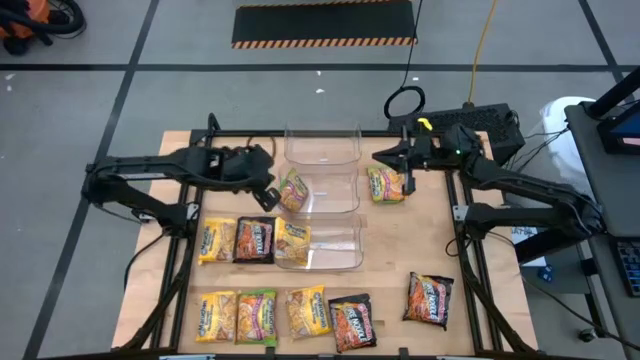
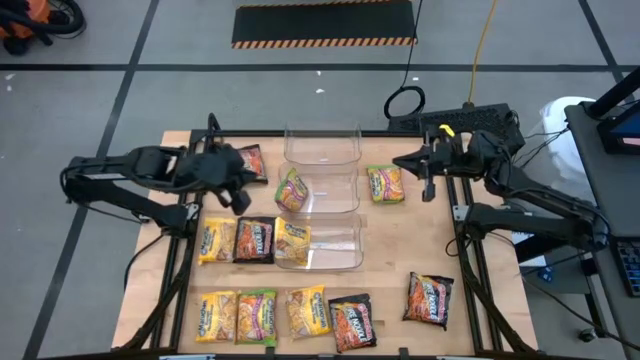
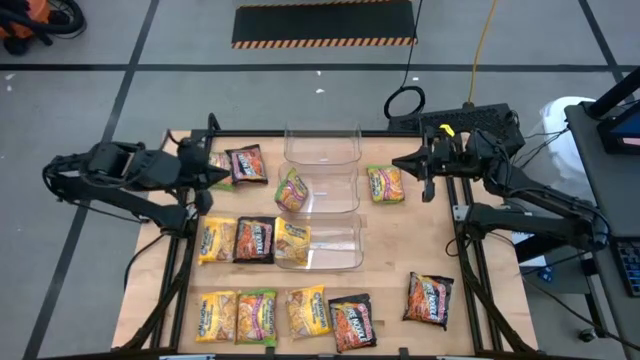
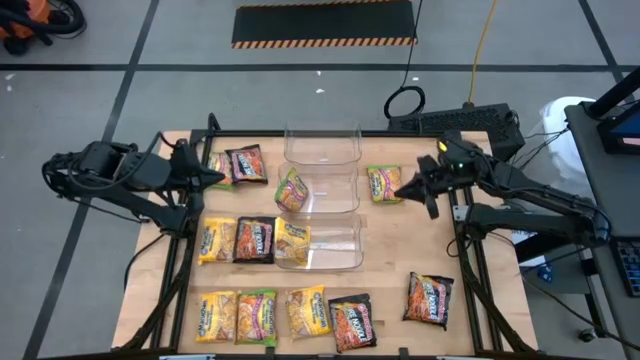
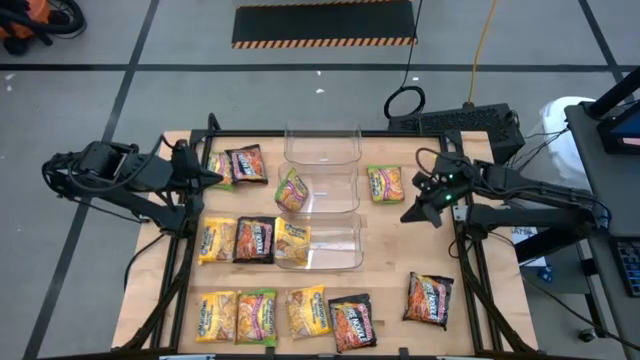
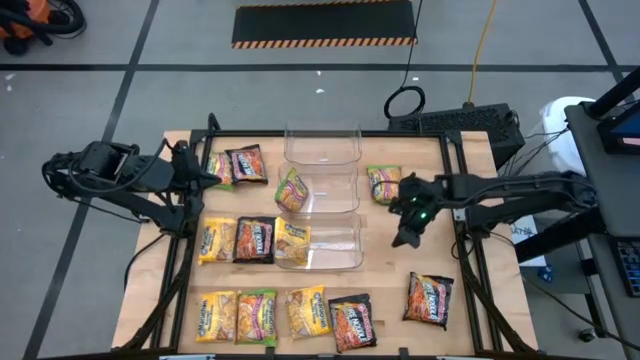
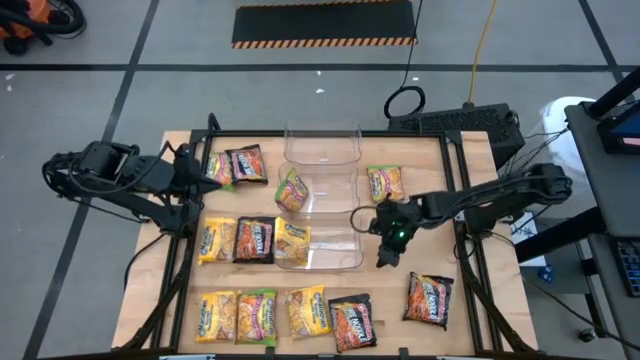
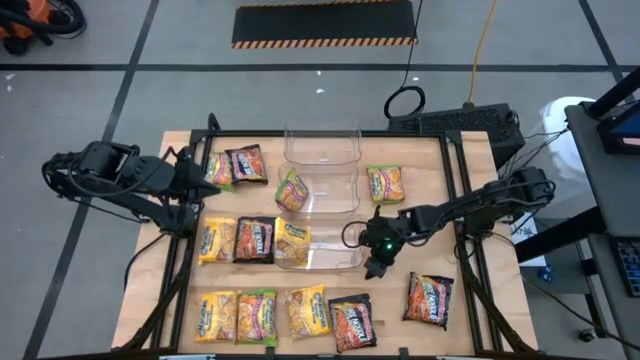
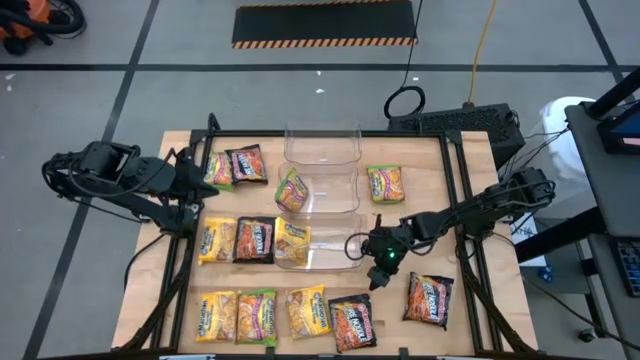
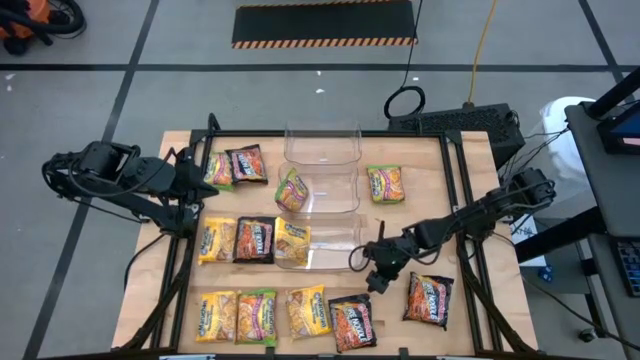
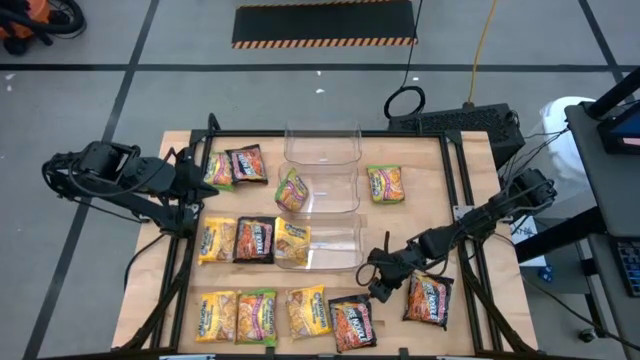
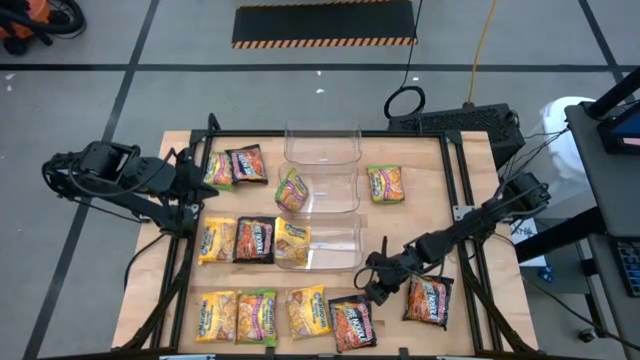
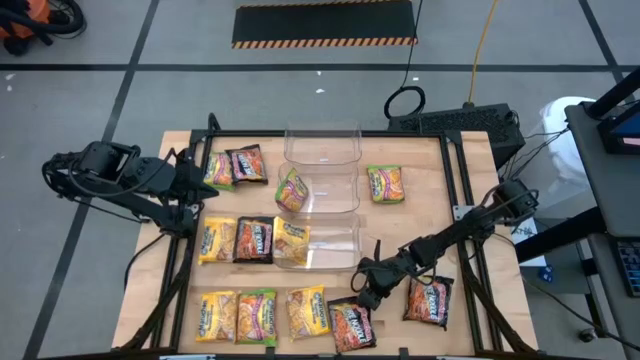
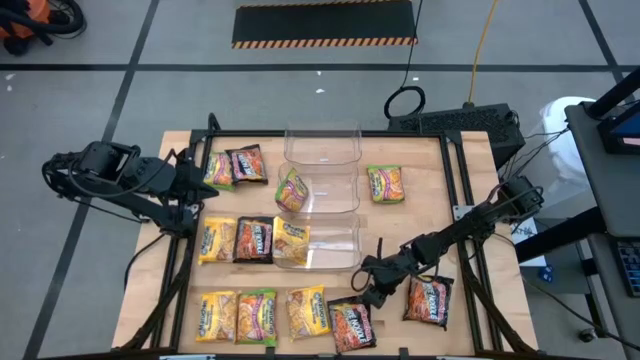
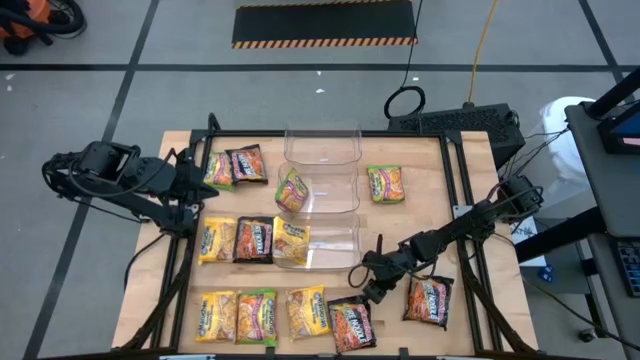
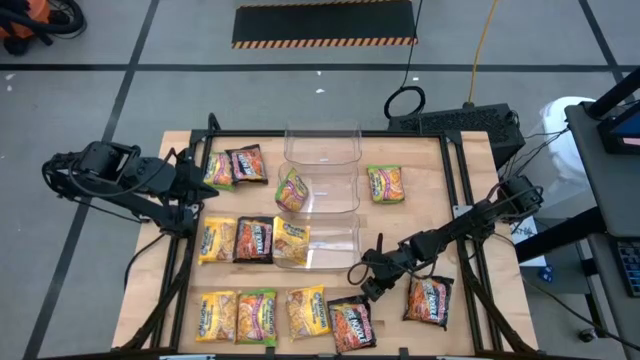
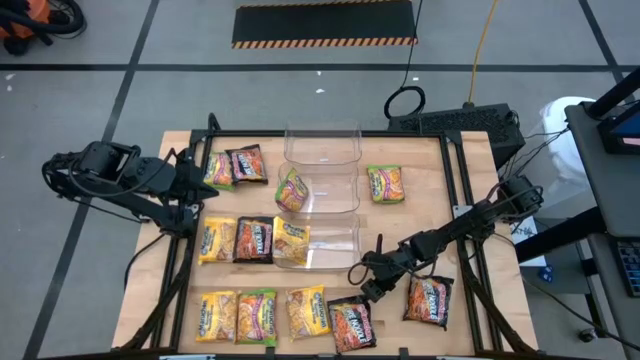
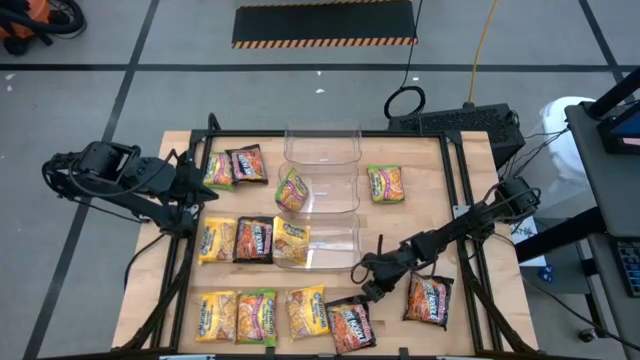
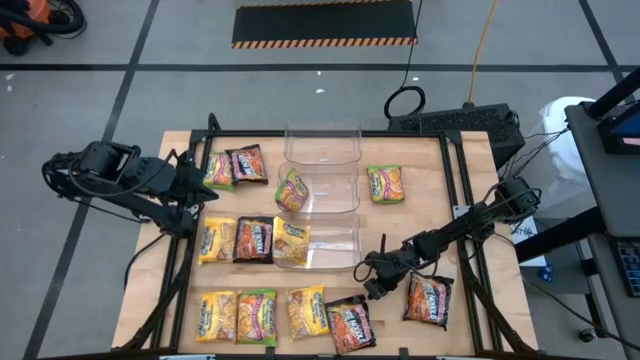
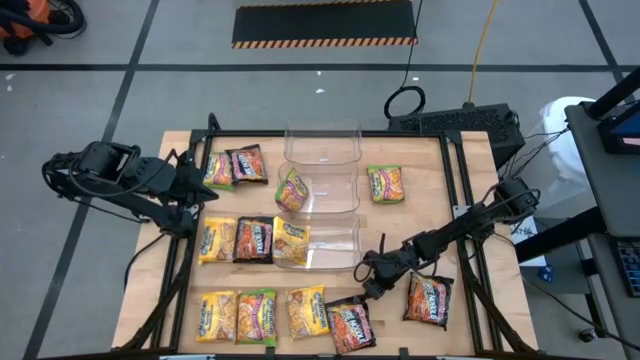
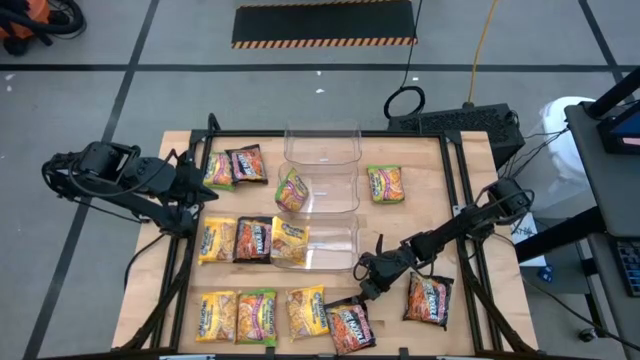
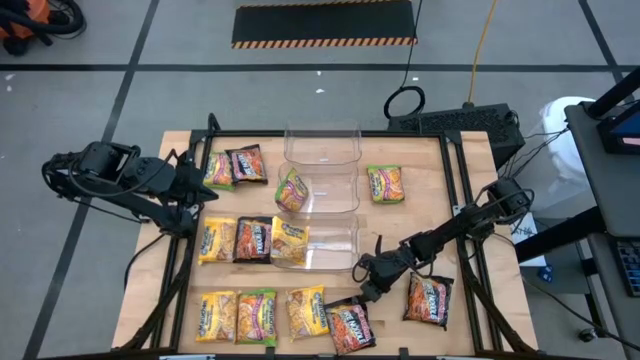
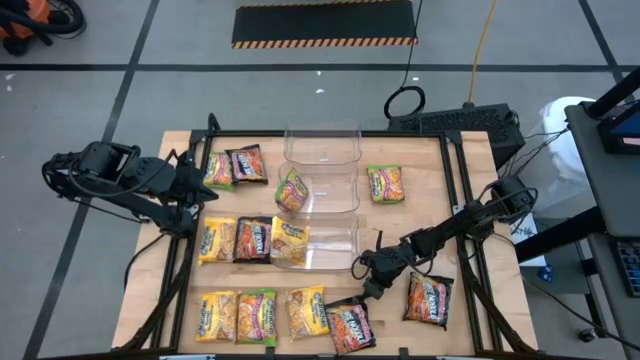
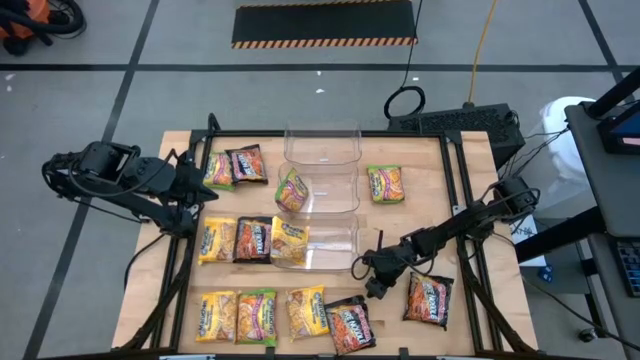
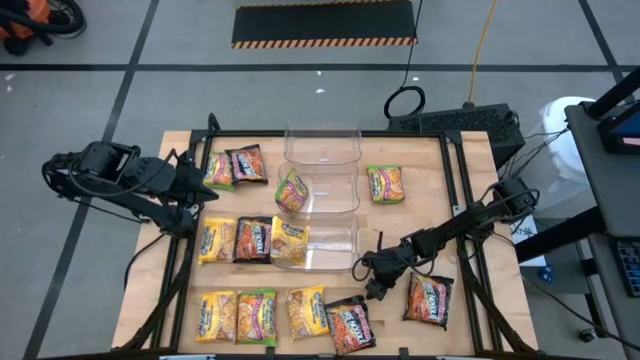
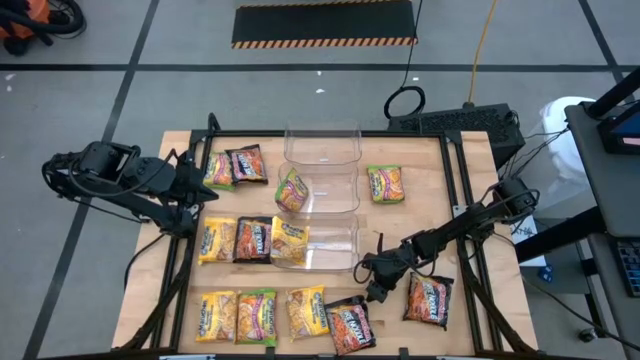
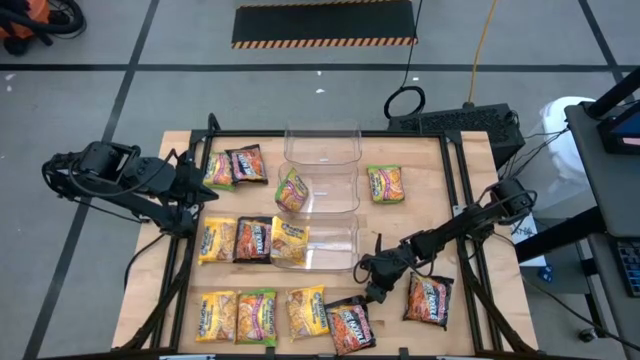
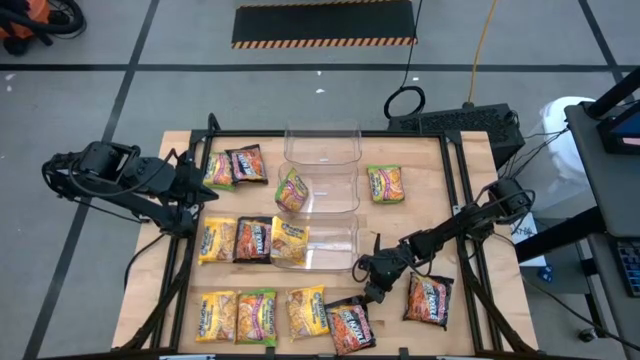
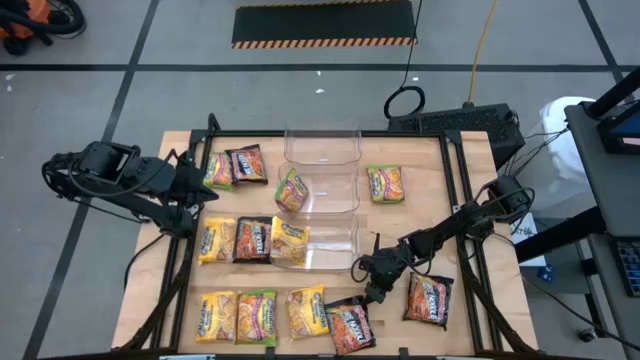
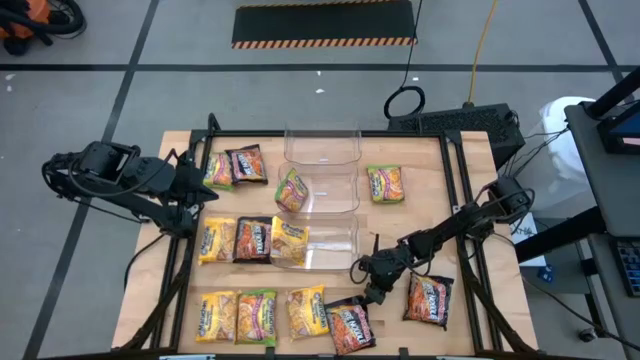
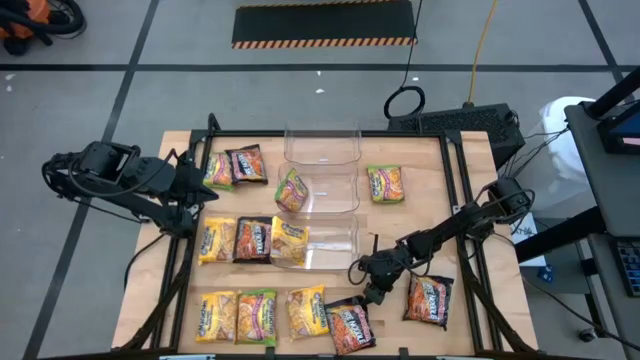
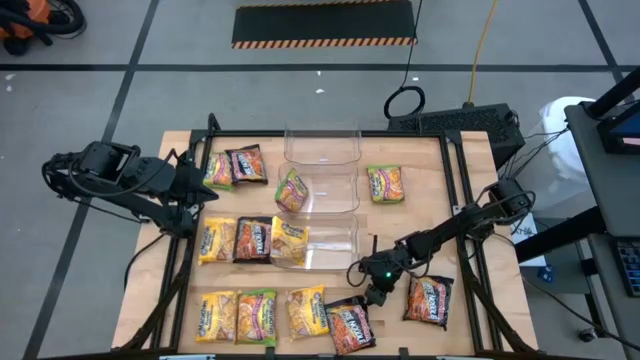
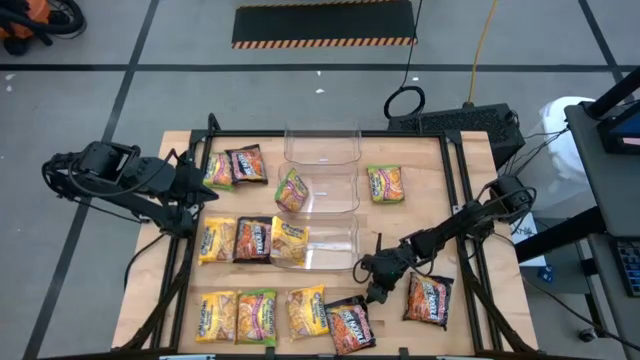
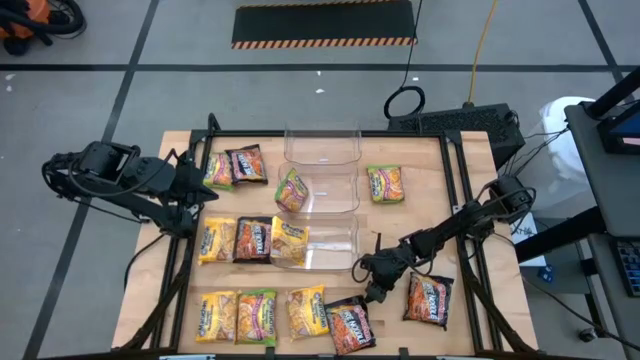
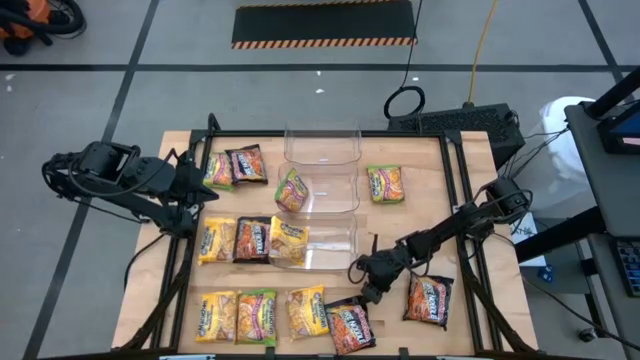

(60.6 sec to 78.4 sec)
Task: Sort Maruchan noodles
Put the black noodle pack into the top transparent bin

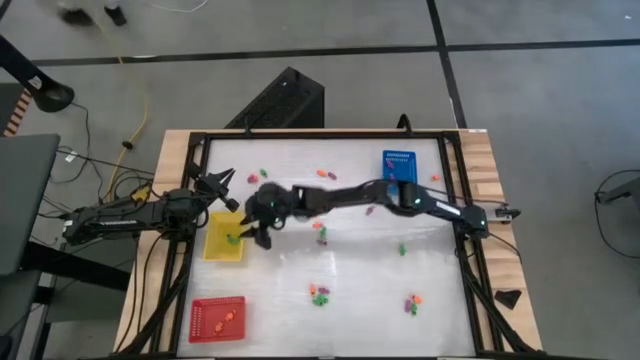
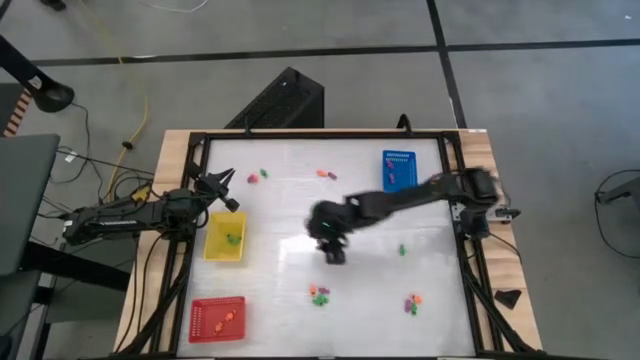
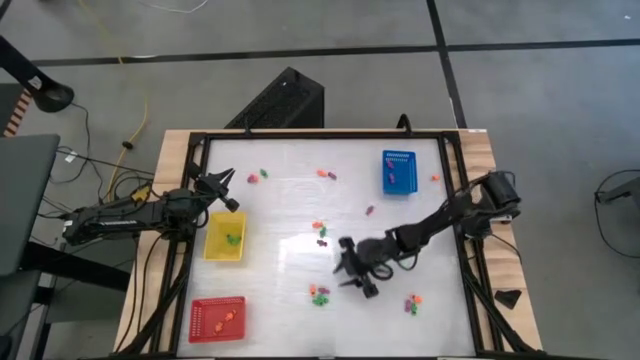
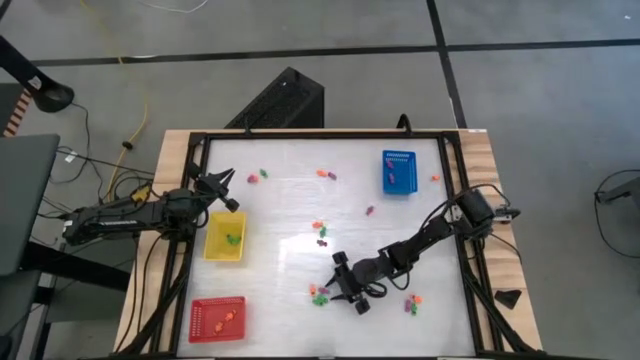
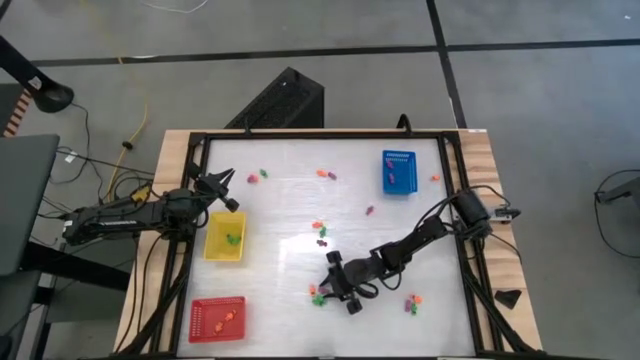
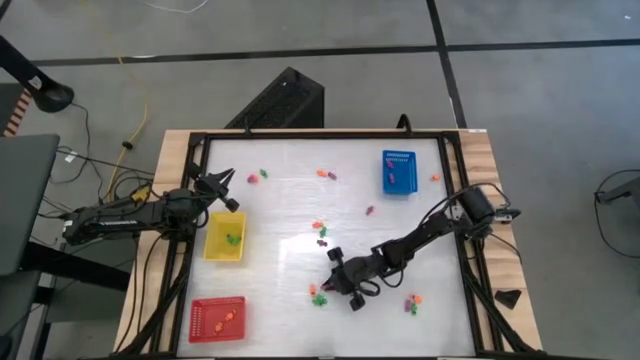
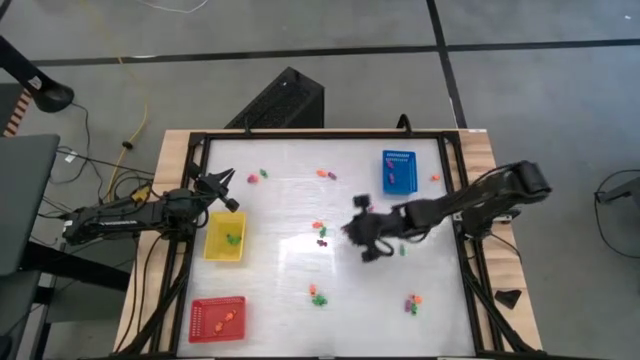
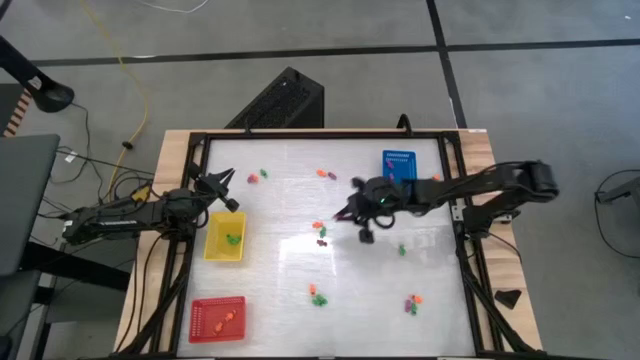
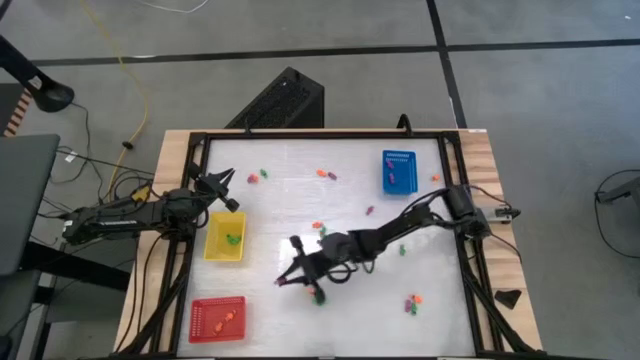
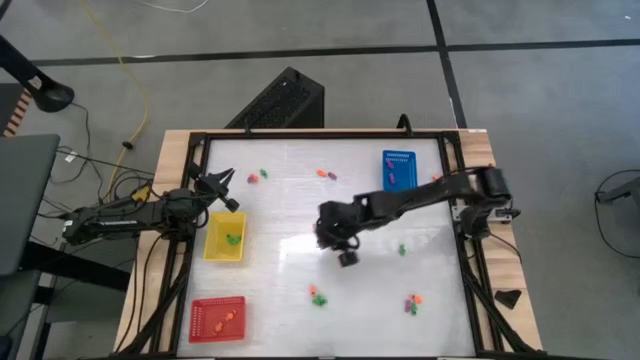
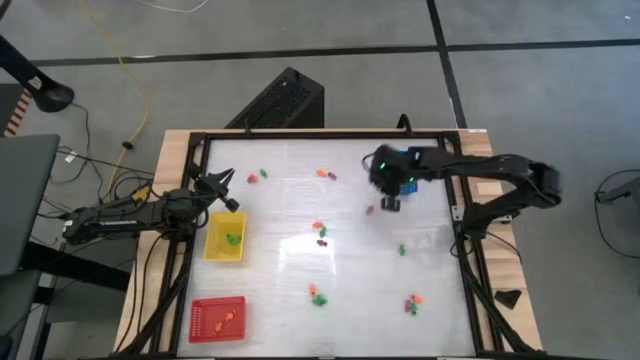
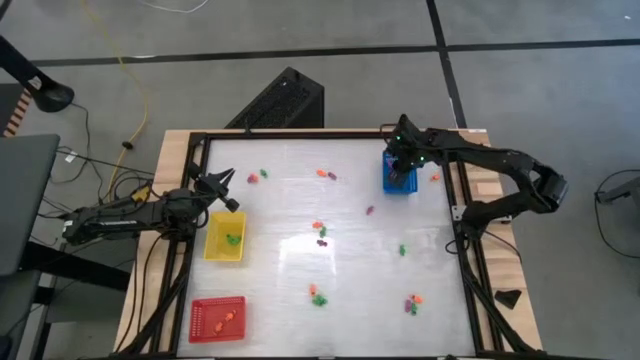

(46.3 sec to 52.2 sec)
Task: Sort Halloween decoration
Put the purple skeleton toy into the blue bin
